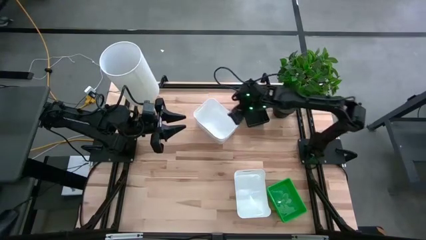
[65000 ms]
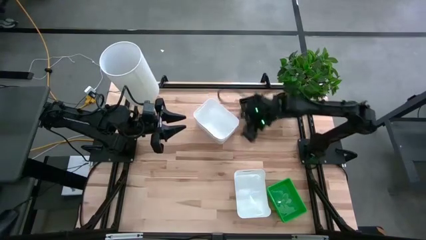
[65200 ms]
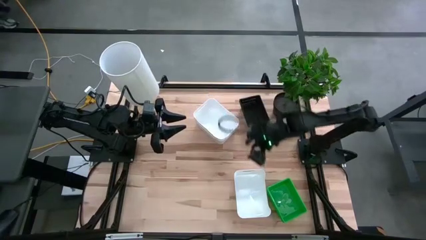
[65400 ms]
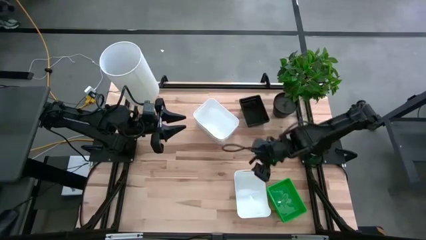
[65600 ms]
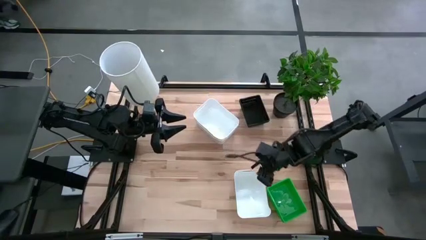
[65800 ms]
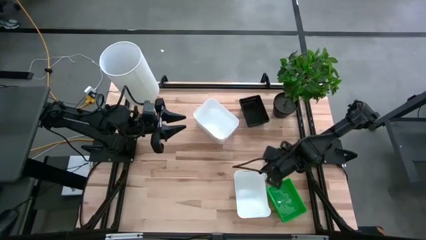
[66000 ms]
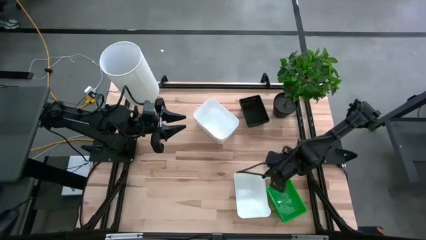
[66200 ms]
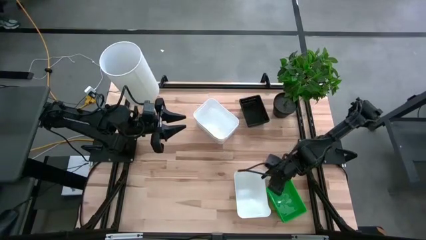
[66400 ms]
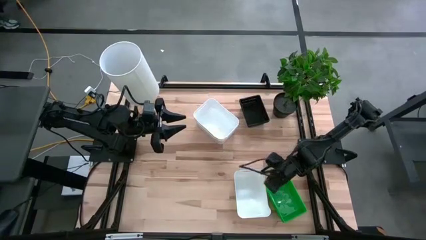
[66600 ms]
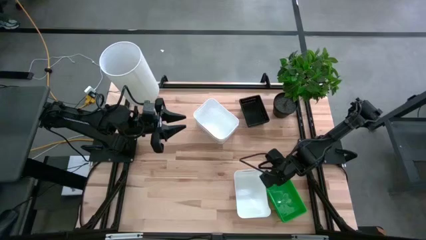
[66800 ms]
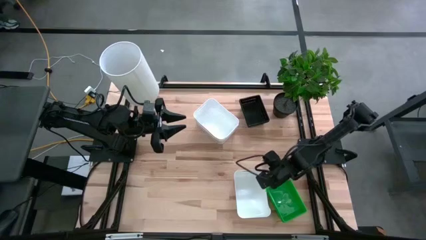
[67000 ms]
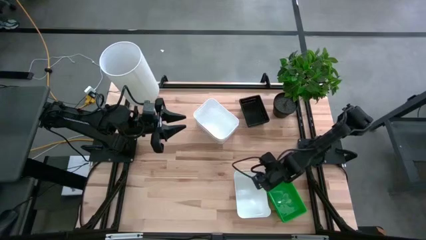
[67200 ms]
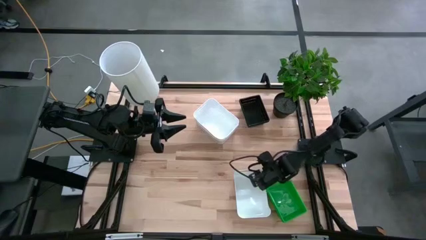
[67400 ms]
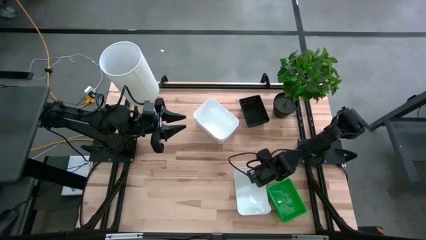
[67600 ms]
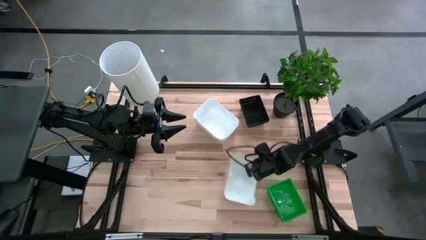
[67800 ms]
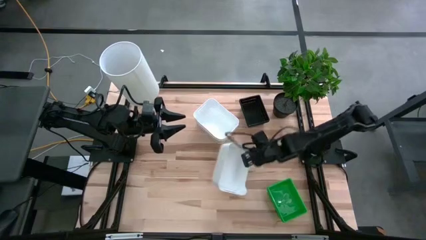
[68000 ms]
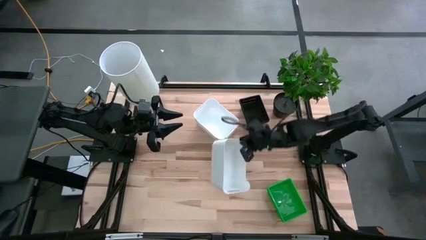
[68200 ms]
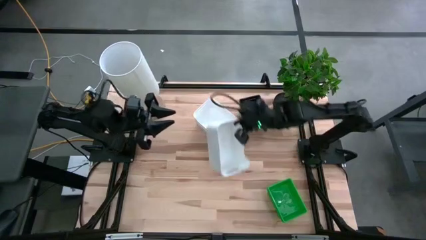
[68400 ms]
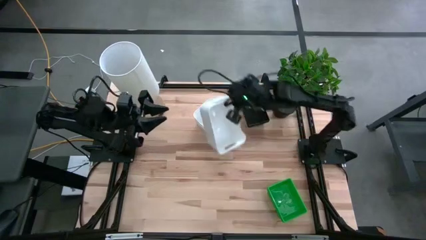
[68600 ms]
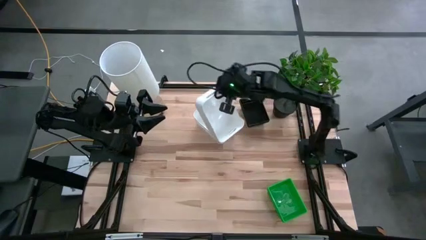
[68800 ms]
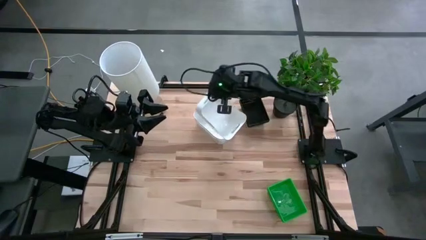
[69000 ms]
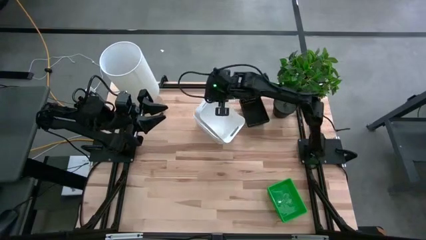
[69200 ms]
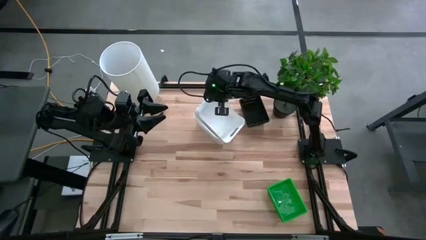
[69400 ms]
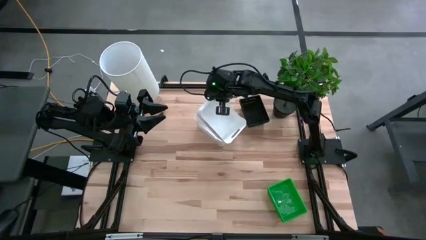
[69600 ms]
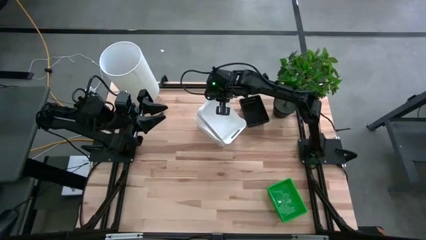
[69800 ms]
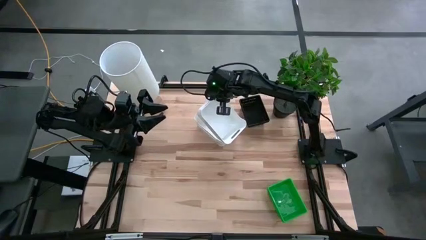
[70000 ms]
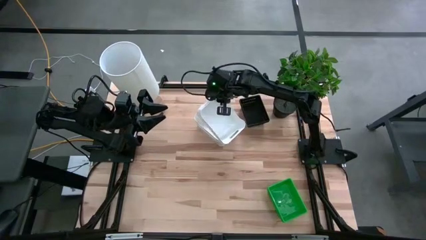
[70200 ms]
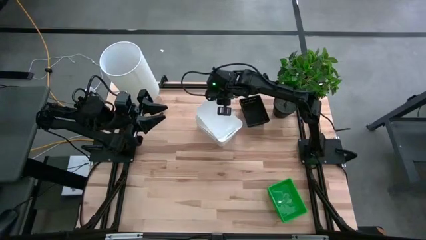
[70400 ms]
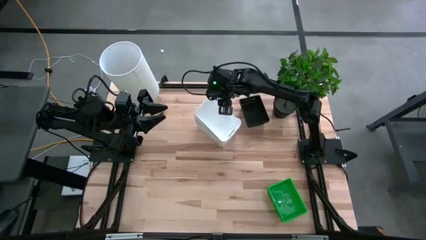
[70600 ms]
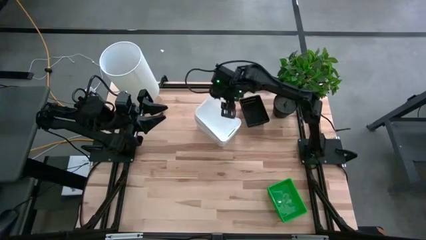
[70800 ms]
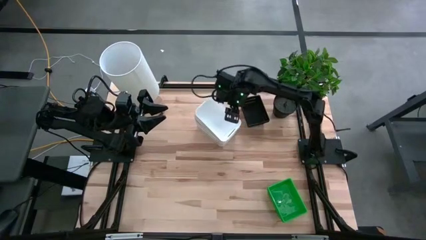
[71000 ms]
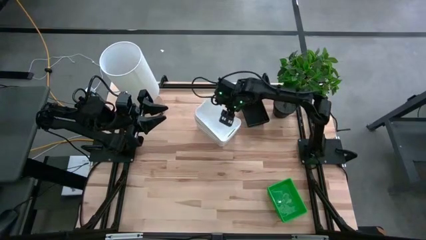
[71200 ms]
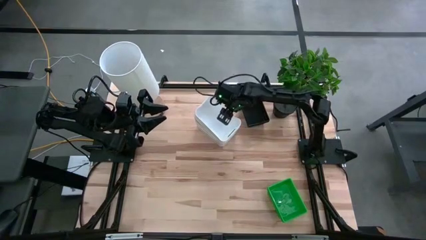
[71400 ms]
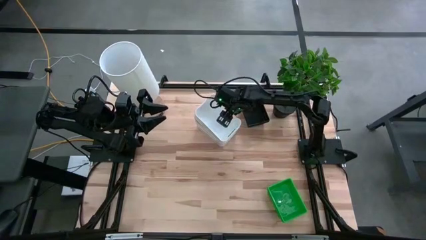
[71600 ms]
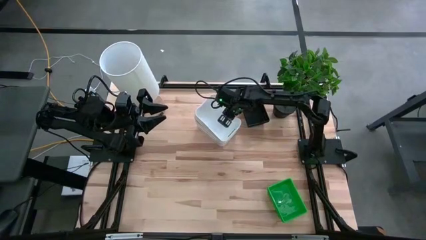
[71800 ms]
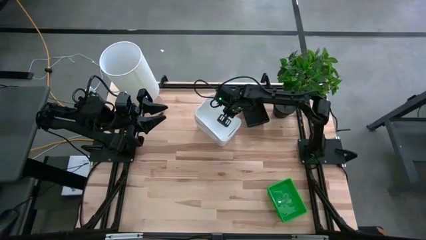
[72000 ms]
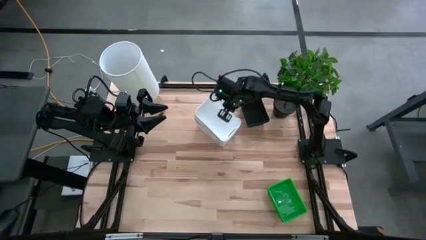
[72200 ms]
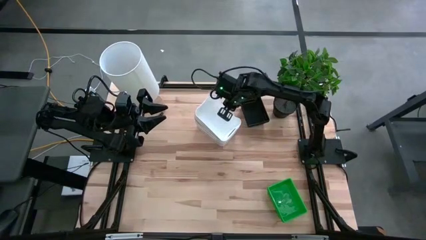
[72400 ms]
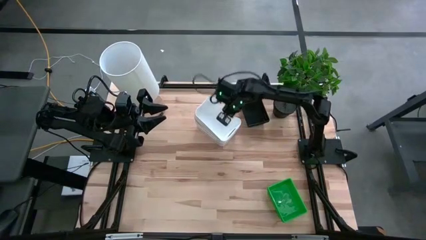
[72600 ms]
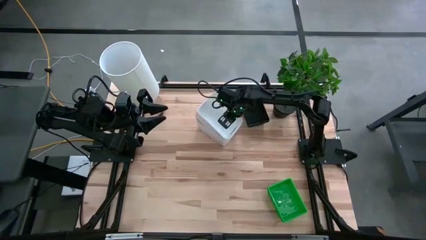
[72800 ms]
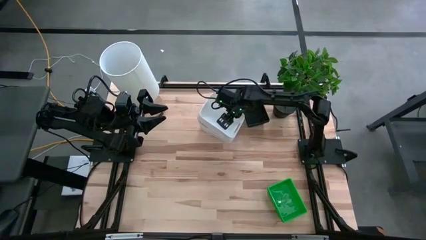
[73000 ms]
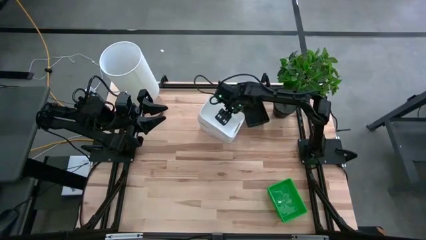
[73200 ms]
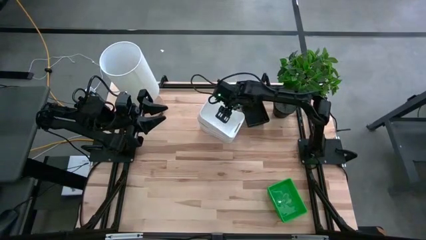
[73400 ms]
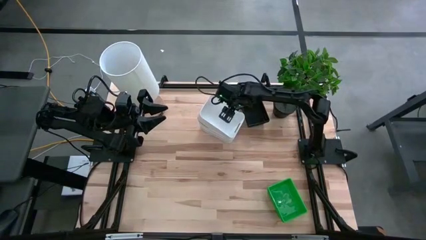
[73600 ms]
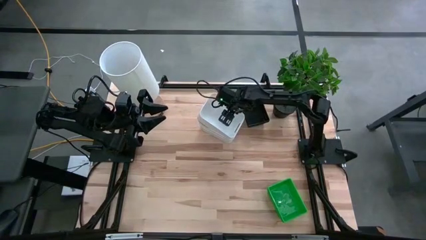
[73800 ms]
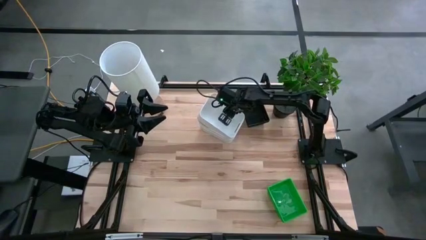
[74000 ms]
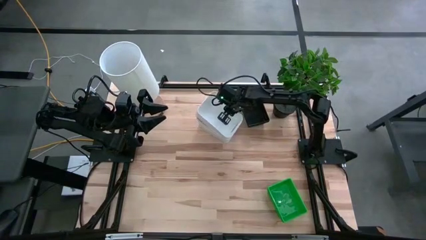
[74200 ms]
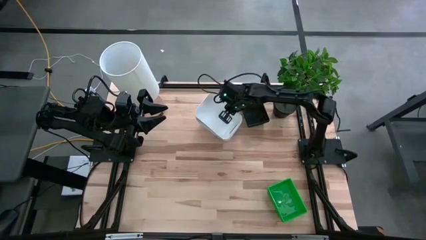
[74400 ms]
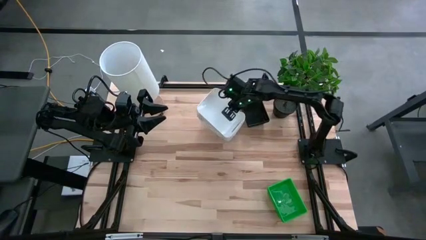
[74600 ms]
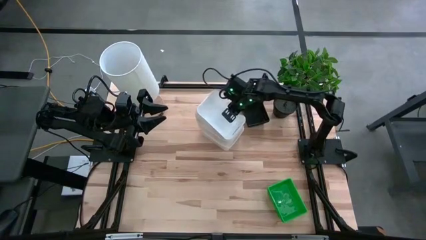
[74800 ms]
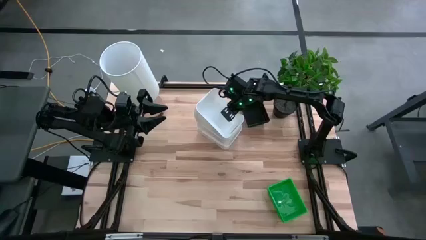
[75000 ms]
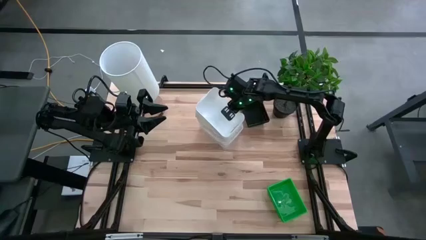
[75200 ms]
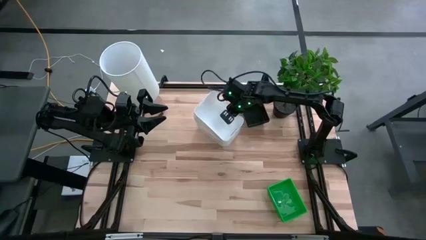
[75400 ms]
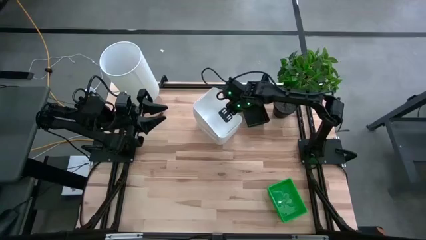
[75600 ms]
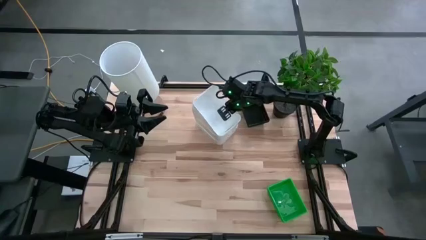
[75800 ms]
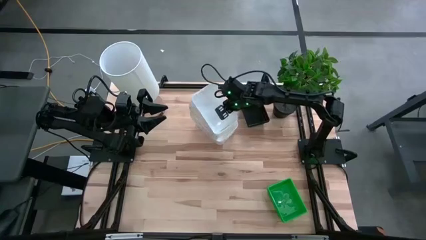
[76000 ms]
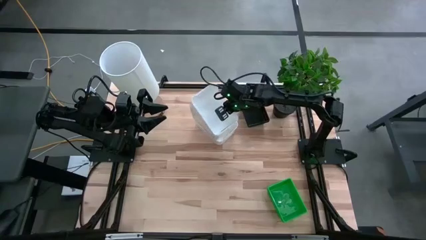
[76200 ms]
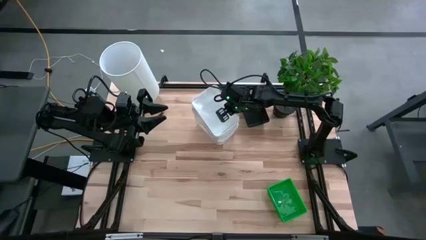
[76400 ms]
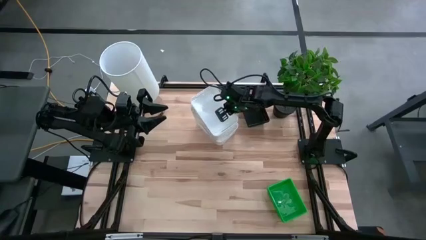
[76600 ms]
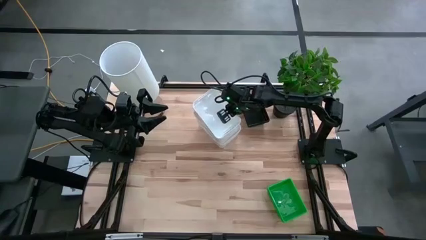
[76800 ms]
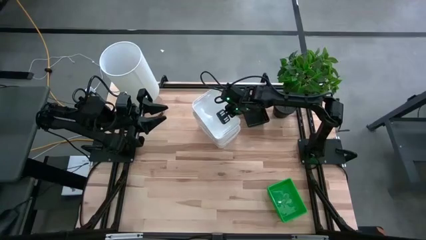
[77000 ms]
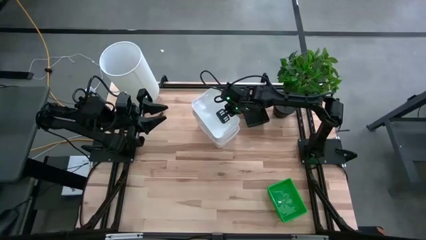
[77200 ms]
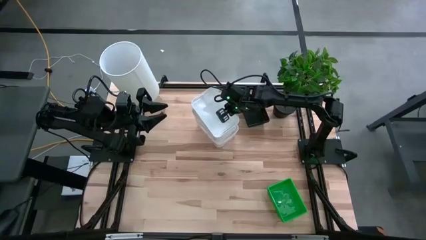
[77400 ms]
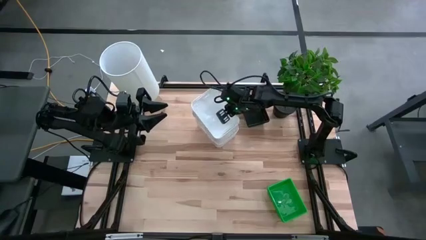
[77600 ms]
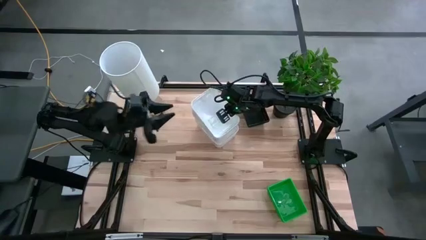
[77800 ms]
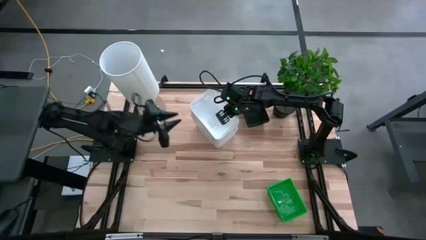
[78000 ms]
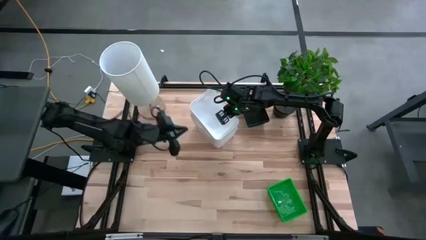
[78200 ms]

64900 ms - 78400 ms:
Stack the bottom white bin on top of the top white bins
